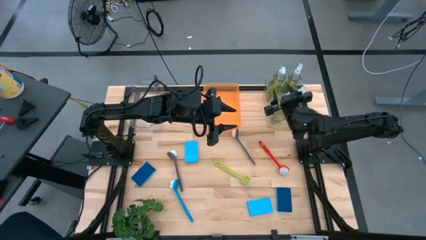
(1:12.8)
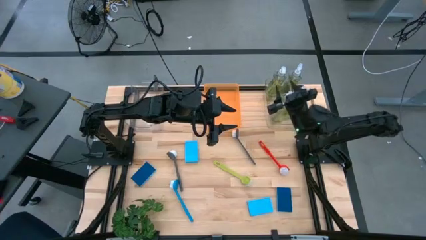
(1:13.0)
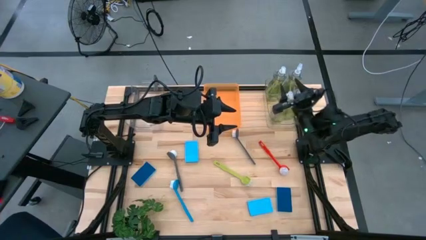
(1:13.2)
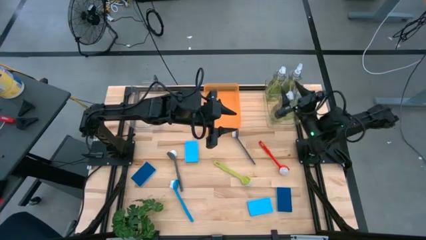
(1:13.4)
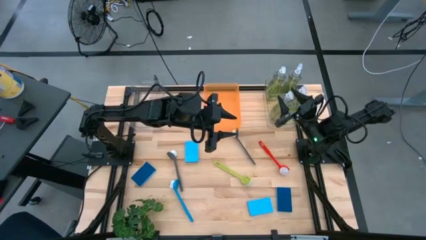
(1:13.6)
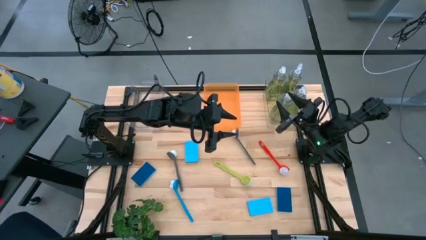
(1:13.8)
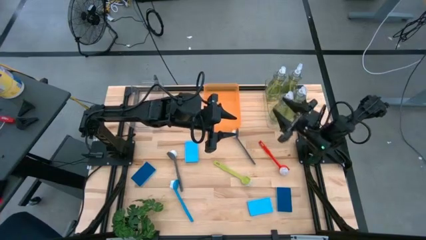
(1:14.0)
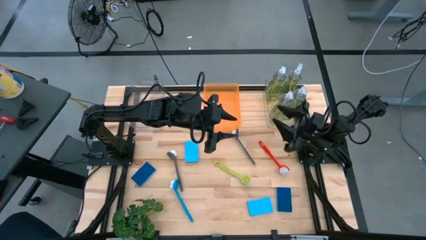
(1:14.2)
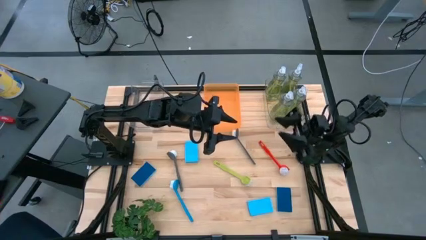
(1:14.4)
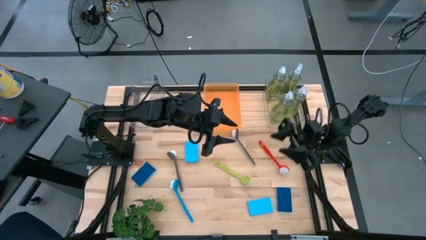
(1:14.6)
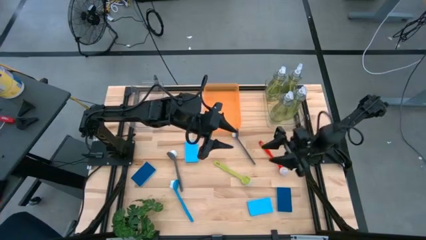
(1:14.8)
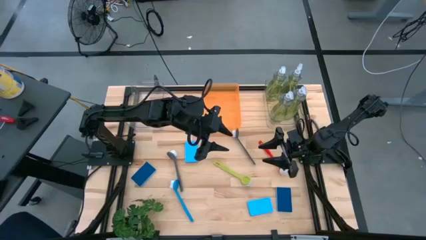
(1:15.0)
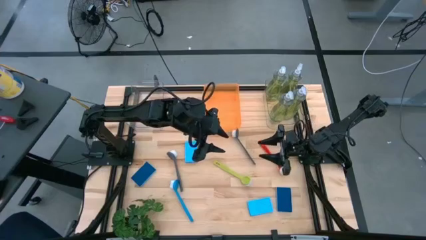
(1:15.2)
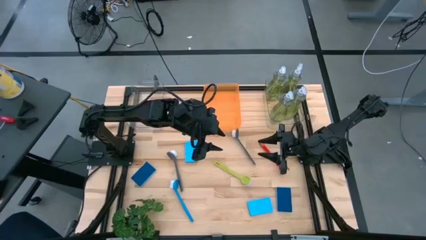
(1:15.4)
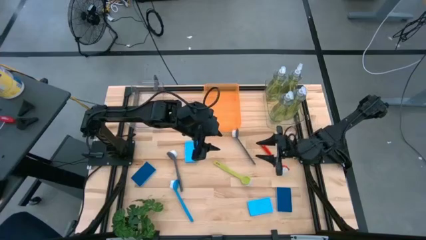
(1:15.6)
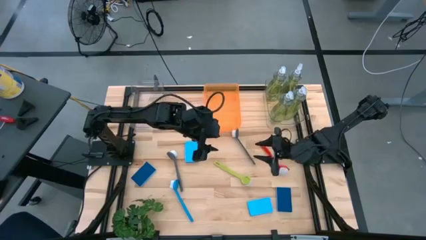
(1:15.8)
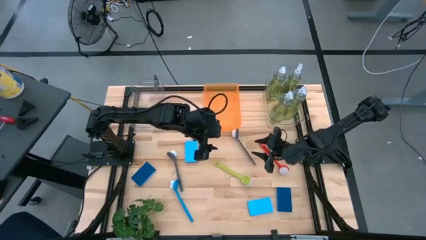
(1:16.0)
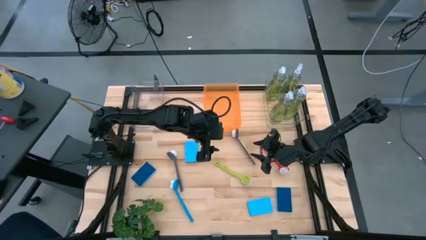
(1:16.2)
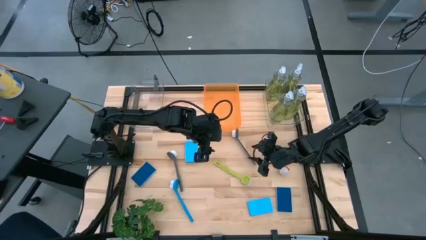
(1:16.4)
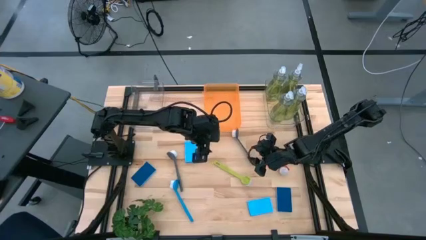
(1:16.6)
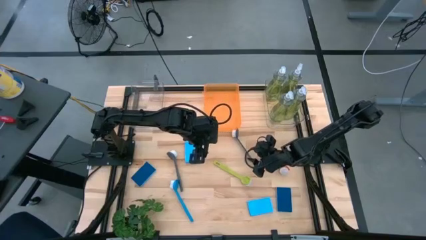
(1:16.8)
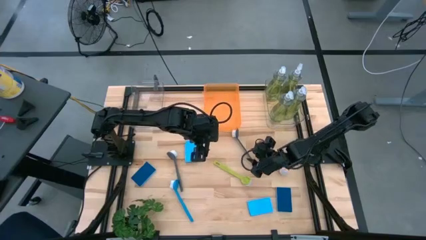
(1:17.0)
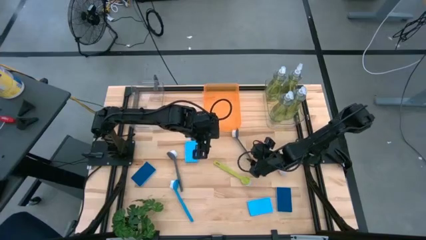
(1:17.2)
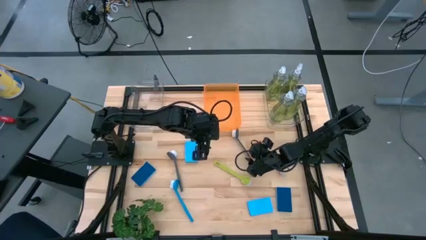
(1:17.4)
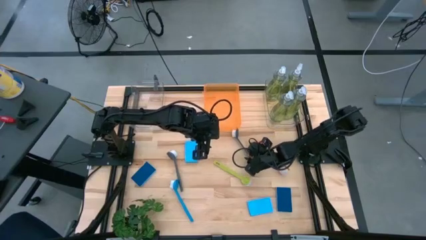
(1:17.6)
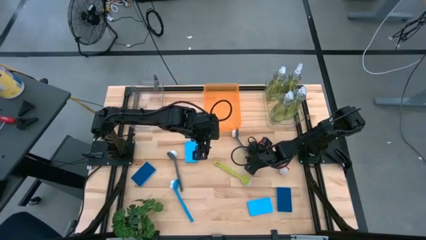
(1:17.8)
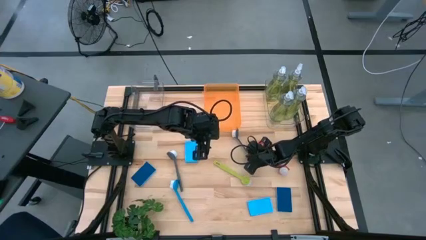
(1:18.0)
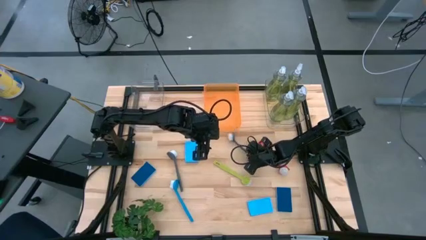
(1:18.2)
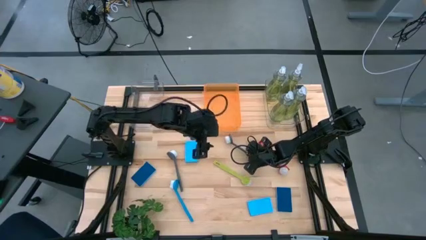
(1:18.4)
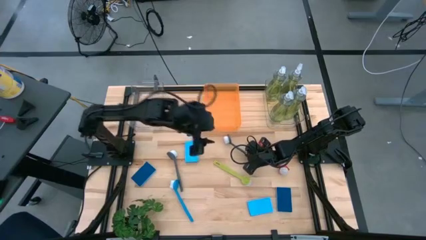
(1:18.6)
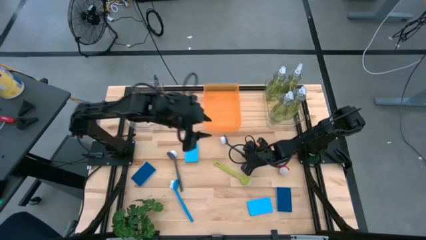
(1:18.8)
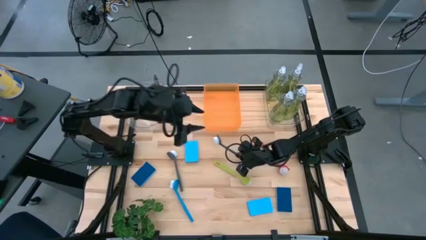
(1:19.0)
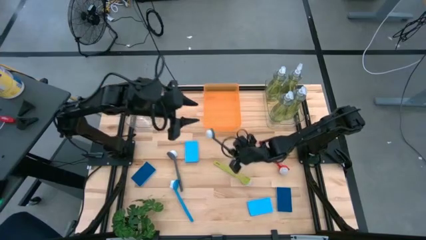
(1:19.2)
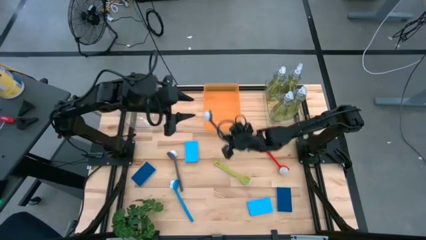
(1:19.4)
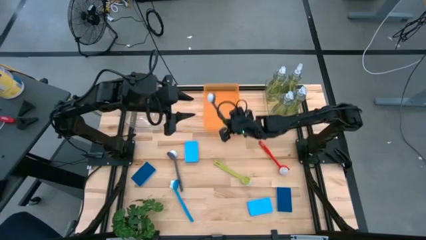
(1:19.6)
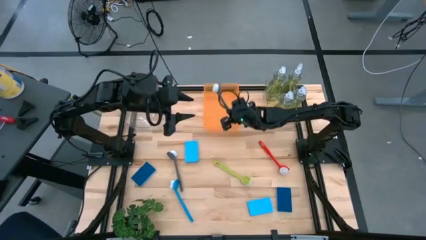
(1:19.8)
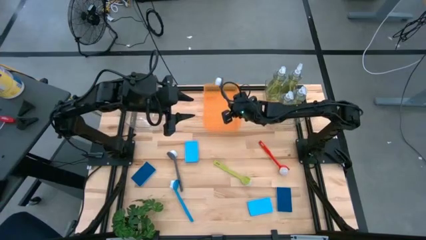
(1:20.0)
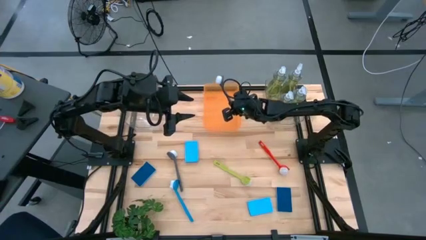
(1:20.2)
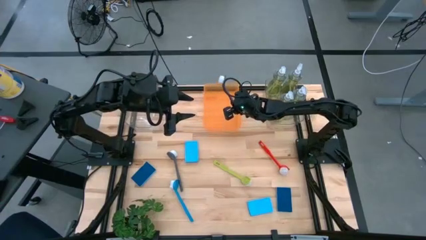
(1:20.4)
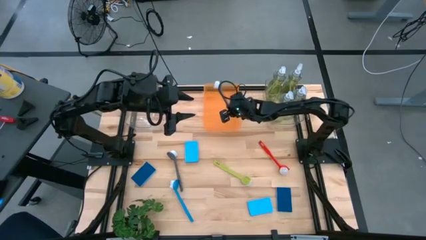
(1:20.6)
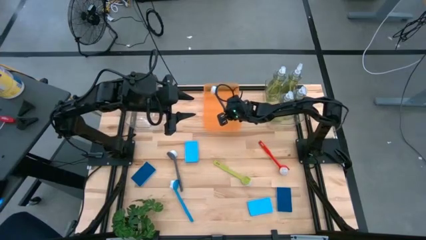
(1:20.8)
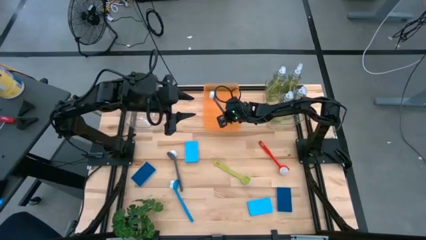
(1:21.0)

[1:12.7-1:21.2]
Task: Pick & Place Kitchen Sink Supplies
Put the gray dish brush into the orange bin

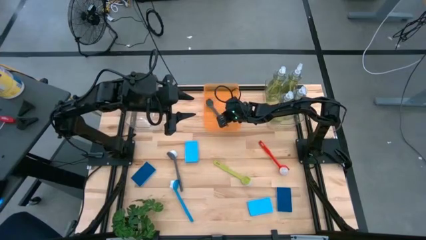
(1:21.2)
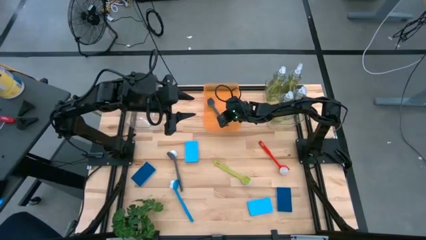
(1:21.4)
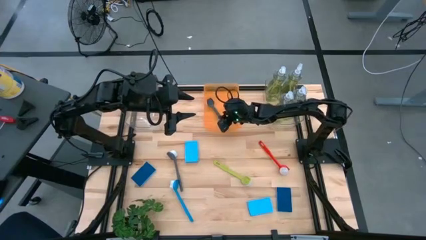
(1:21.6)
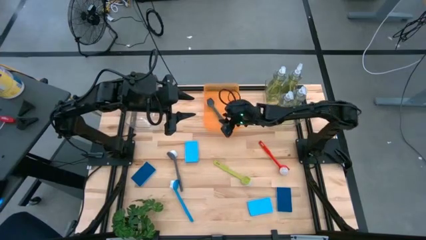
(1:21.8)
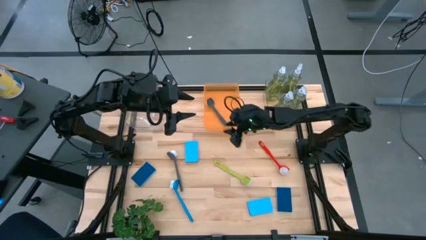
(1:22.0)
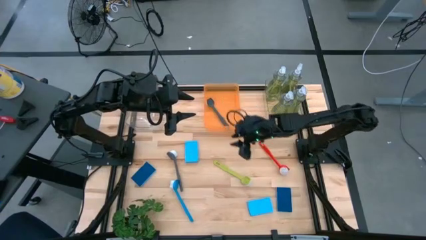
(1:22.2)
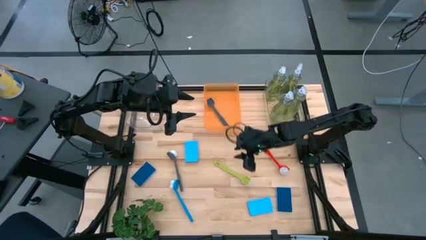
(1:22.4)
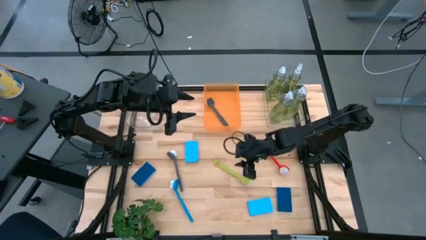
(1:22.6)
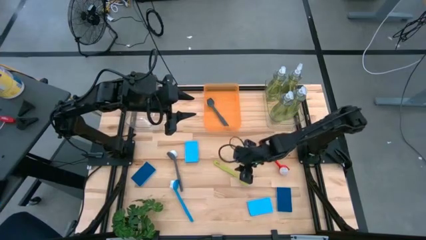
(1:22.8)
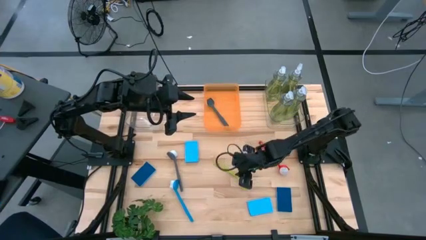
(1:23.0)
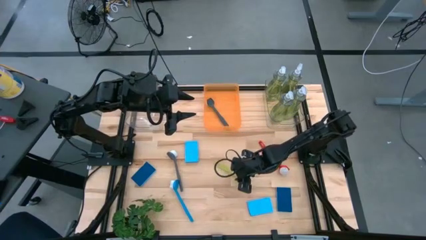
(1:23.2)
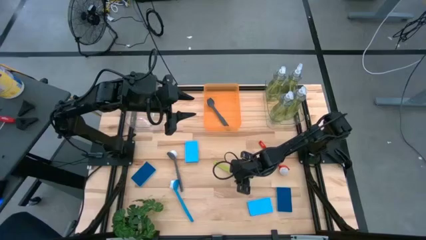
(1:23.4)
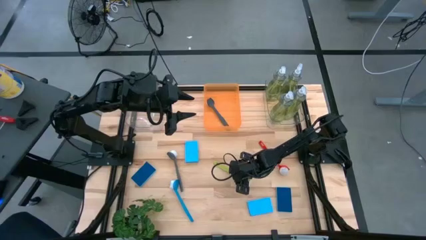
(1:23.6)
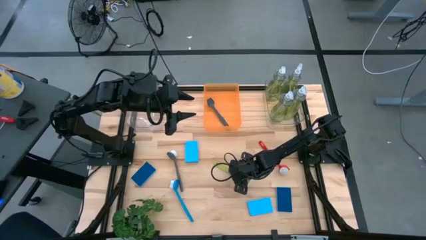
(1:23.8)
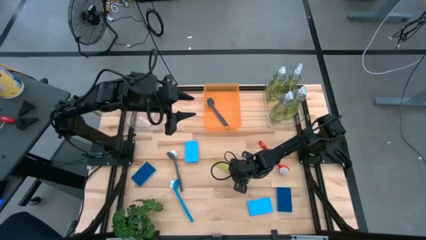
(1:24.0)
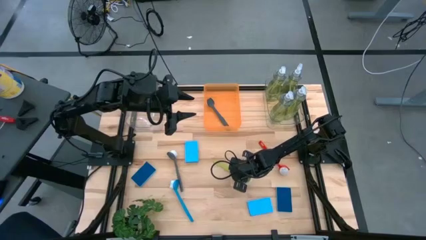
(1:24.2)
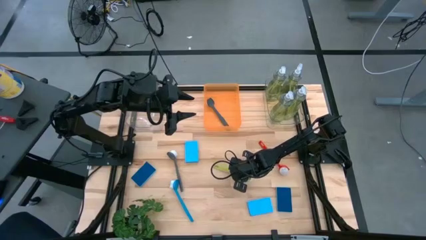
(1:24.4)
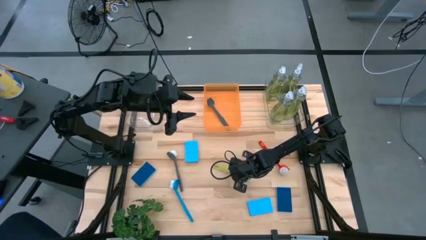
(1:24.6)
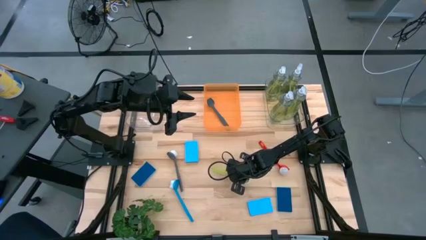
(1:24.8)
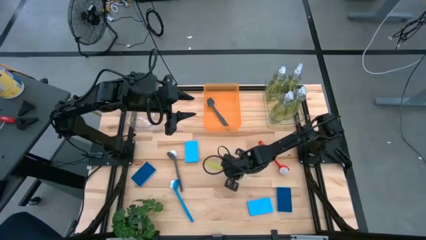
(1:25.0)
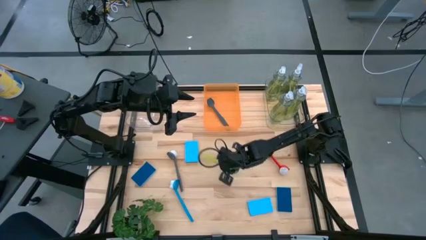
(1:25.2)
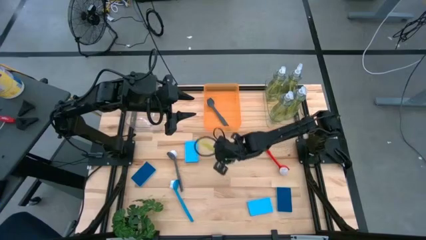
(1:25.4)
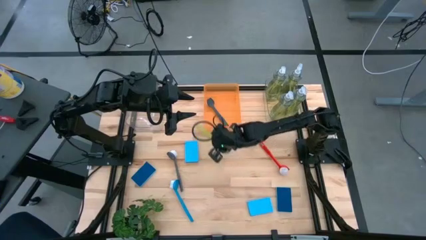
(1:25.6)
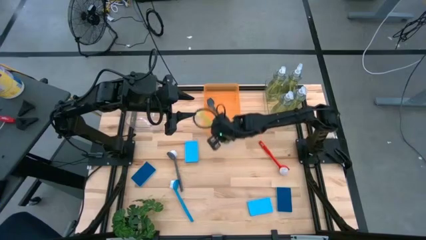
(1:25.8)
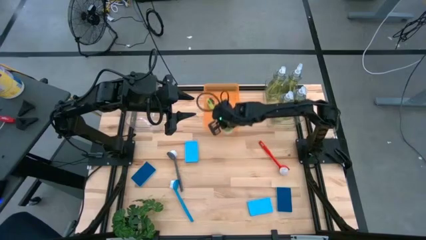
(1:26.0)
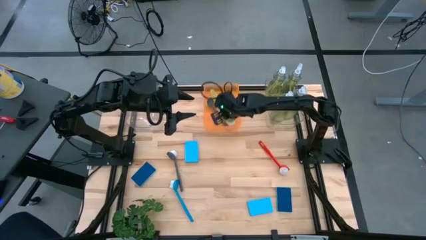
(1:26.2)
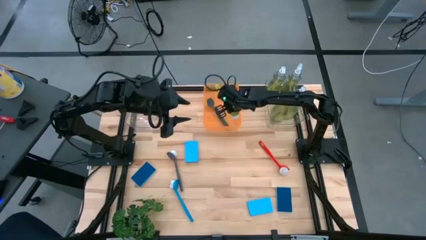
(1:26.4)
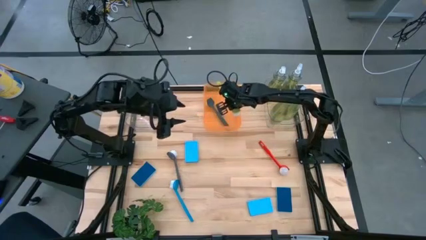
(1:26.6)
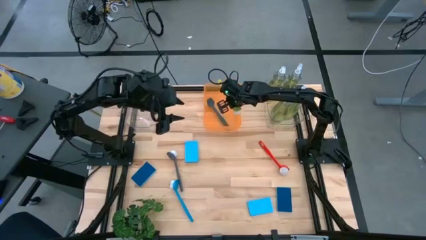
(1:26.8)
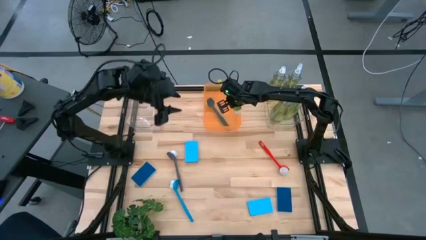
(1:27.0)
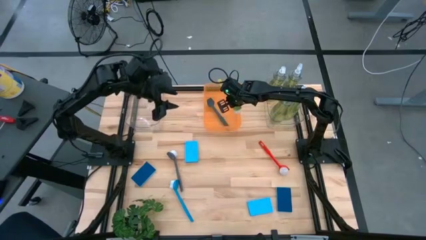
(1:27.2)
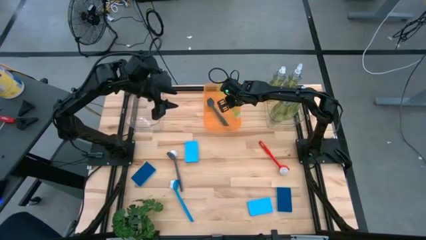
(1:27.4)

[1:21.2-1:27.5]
Put the green dish brush into the orange bin

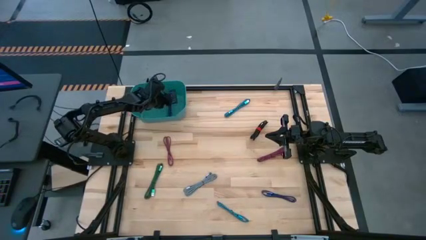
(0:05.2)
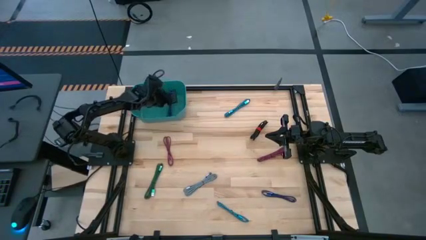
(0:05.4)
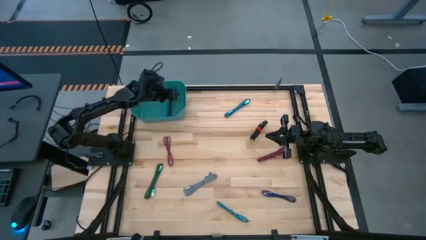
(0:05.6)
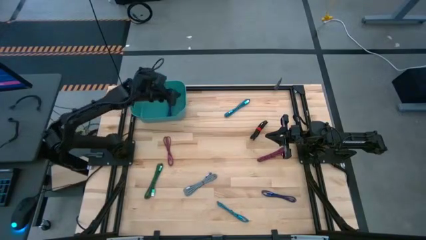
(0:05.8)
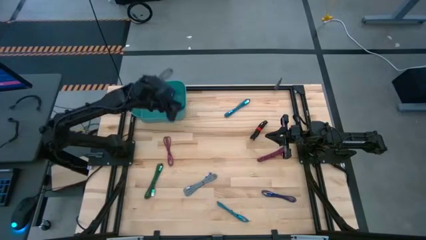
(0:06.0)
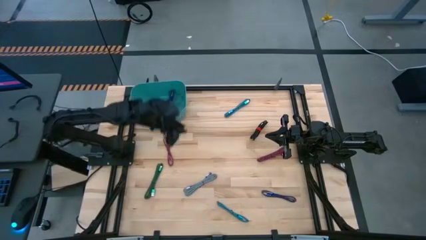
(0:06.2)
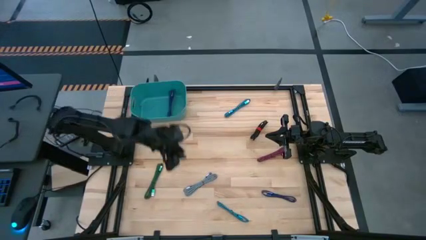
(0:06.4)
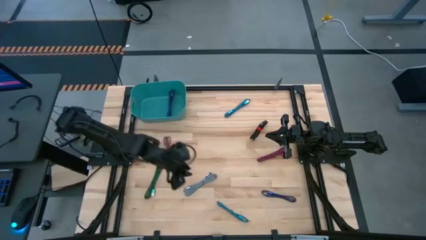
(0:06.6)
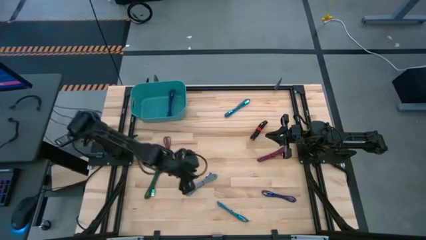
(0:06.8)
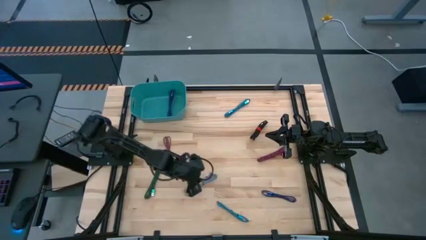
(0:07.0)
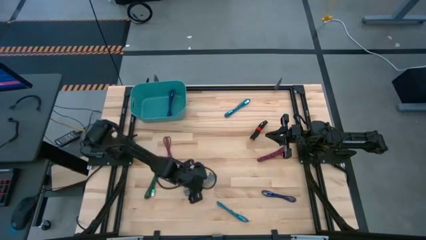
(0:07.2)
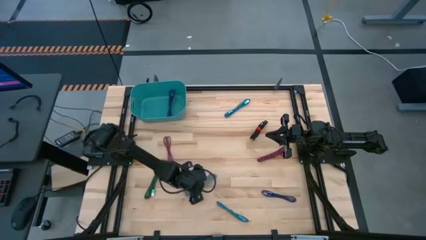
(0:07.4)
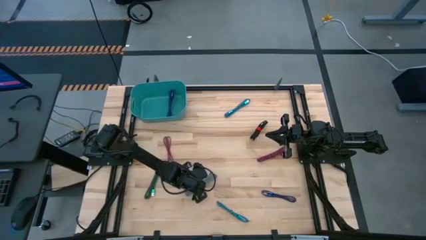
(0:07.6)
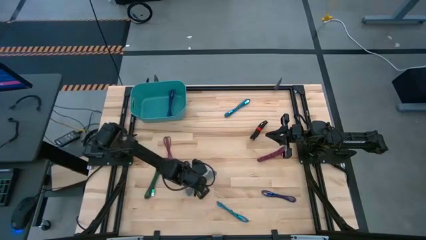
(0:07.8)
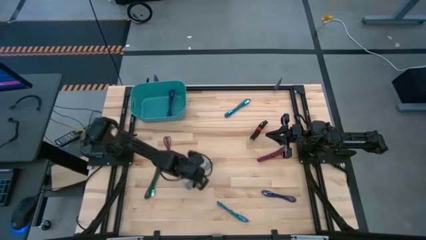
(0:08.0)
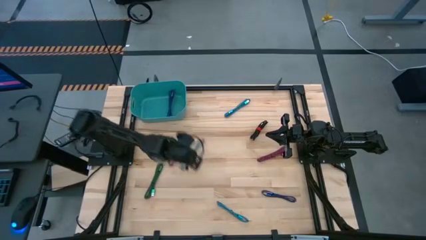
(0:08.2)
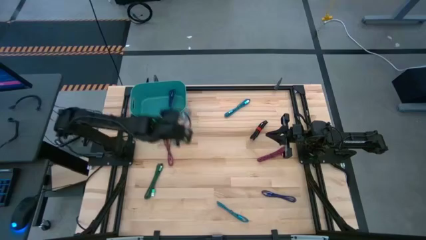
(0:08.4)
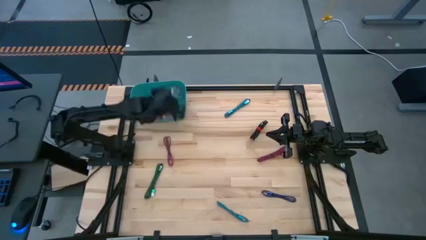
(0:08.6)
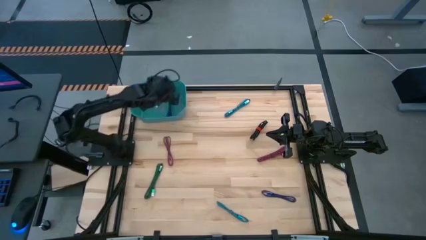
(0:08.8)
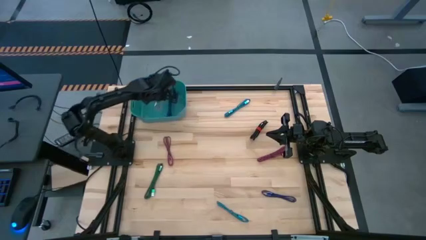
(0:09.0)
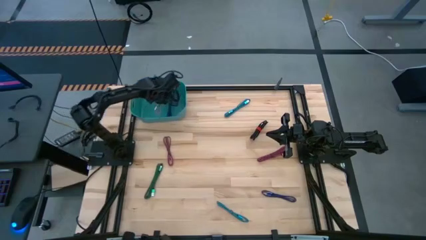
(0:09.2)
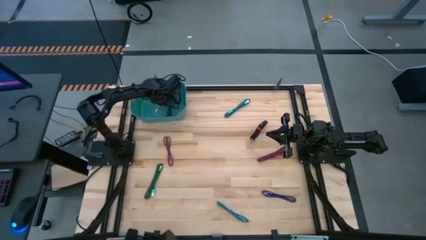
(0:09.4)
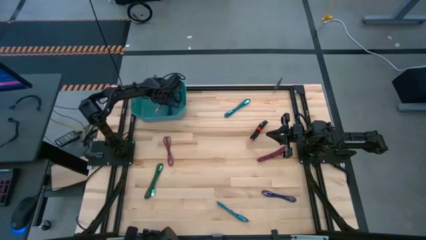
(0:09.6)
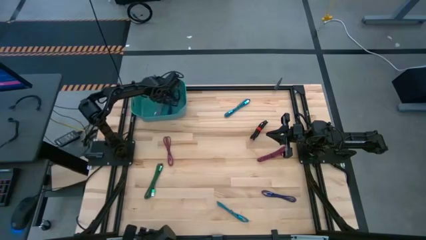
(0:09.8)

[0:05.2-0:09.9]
Task: Pick and place USB-C Cables
Put the gray charger cable into the green bin
